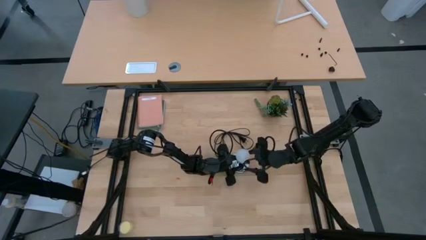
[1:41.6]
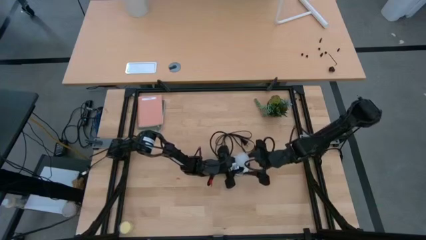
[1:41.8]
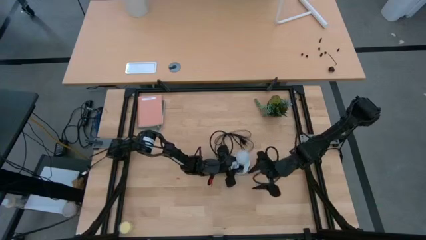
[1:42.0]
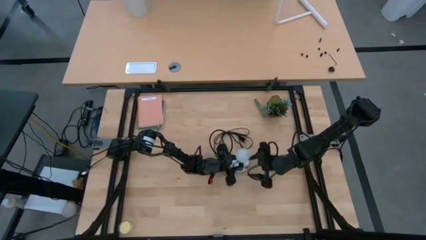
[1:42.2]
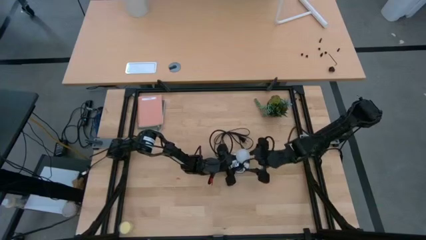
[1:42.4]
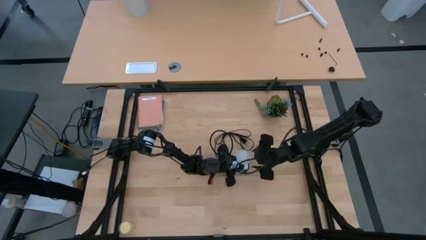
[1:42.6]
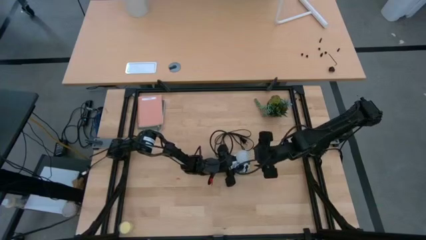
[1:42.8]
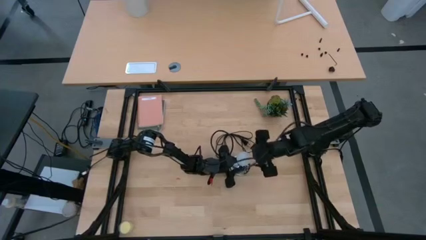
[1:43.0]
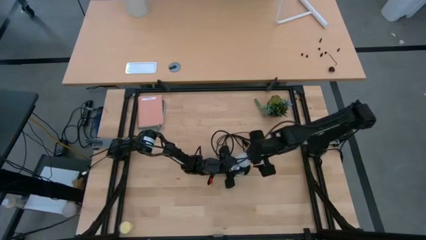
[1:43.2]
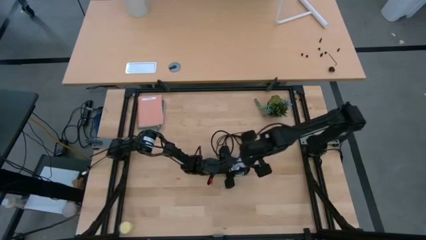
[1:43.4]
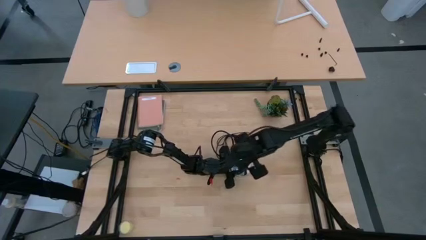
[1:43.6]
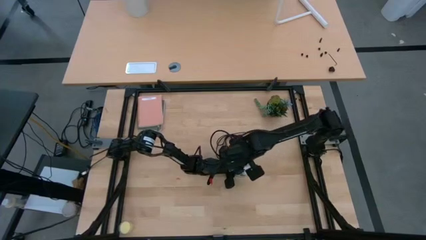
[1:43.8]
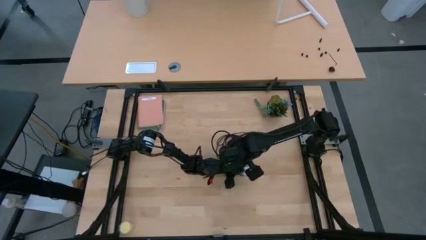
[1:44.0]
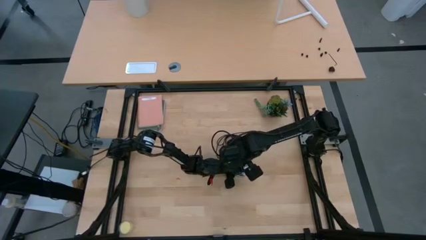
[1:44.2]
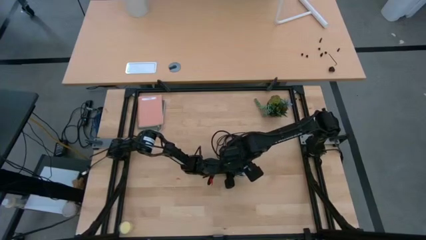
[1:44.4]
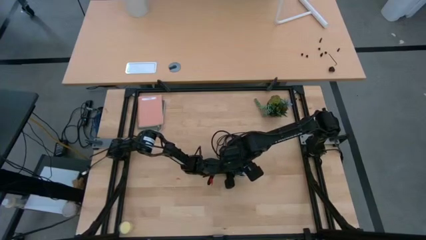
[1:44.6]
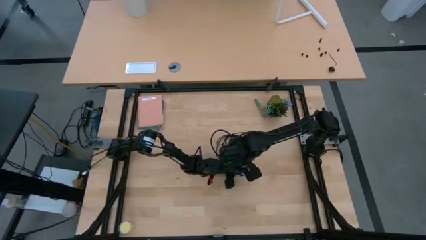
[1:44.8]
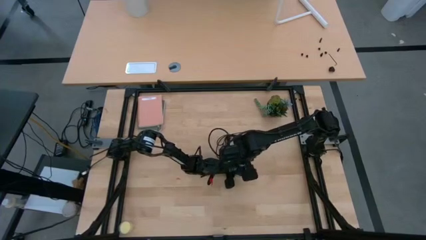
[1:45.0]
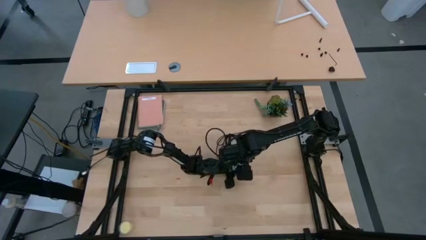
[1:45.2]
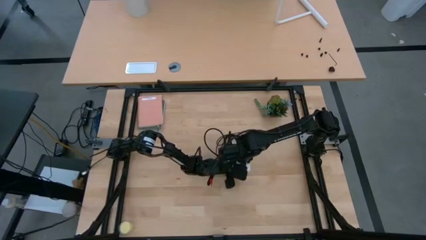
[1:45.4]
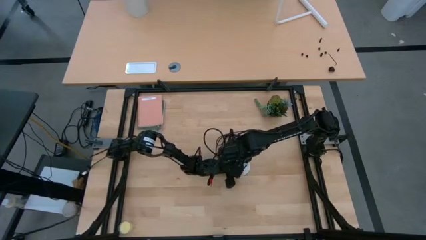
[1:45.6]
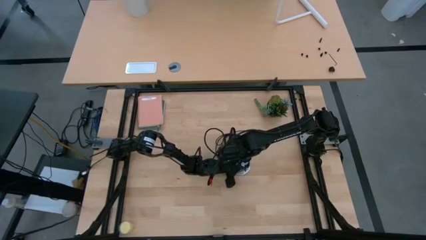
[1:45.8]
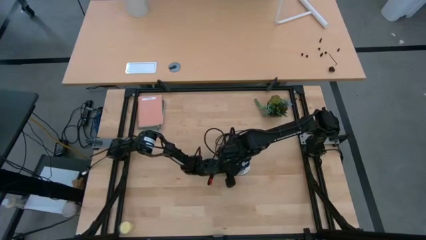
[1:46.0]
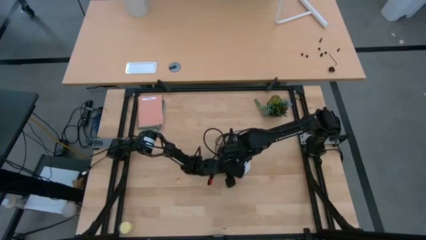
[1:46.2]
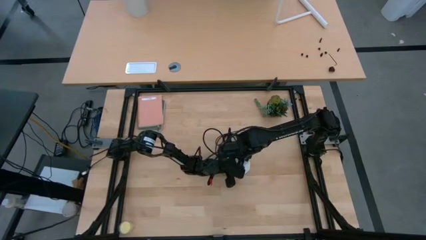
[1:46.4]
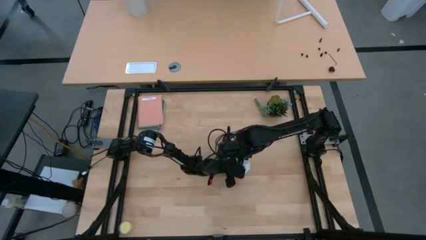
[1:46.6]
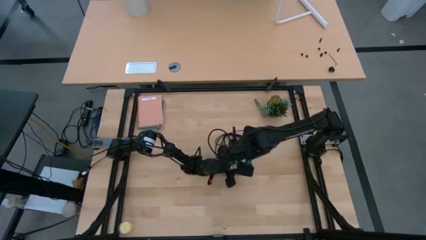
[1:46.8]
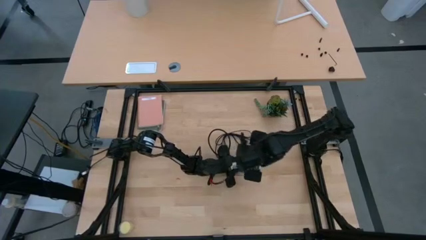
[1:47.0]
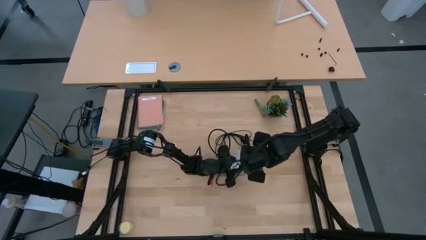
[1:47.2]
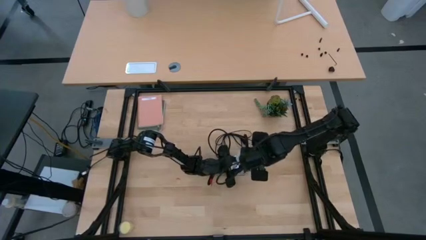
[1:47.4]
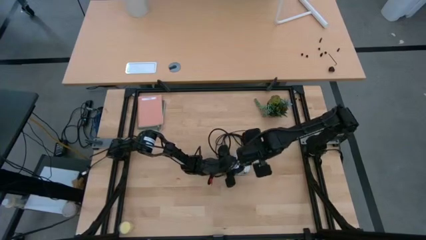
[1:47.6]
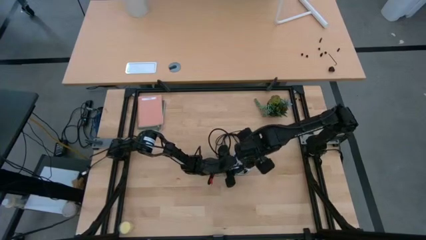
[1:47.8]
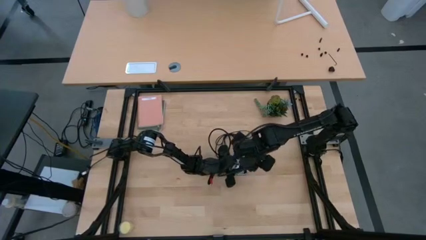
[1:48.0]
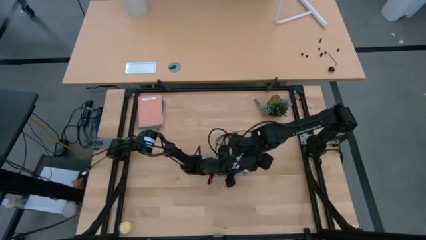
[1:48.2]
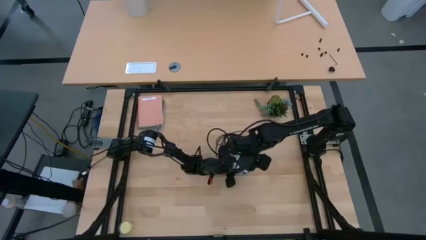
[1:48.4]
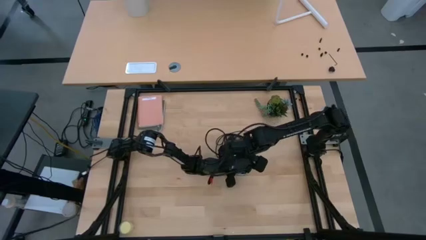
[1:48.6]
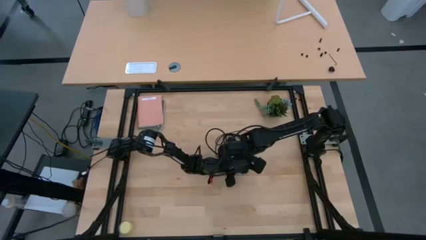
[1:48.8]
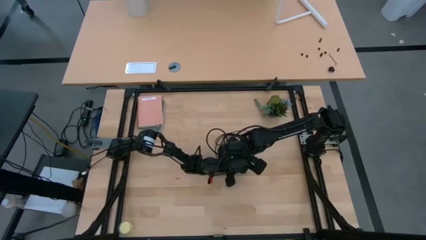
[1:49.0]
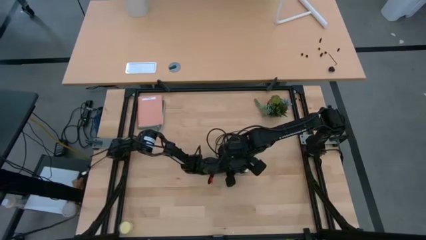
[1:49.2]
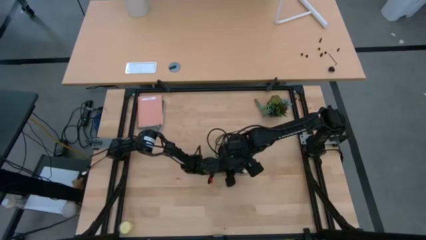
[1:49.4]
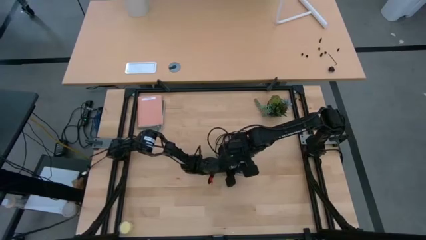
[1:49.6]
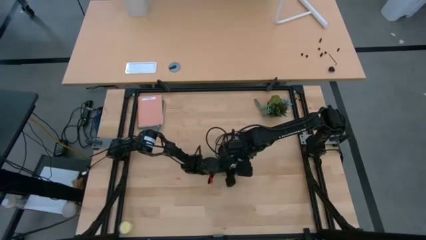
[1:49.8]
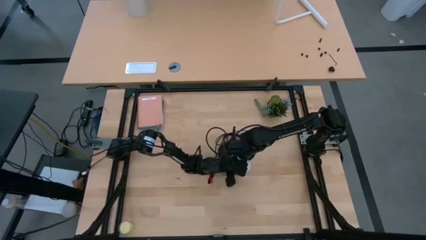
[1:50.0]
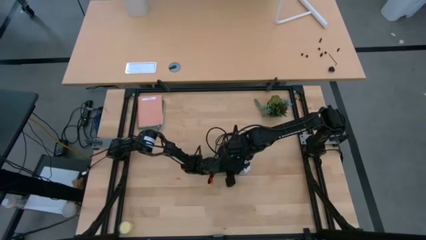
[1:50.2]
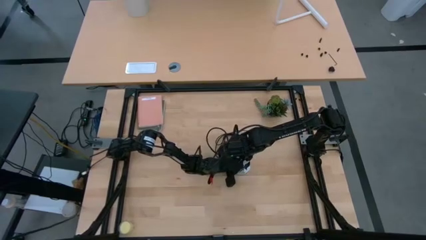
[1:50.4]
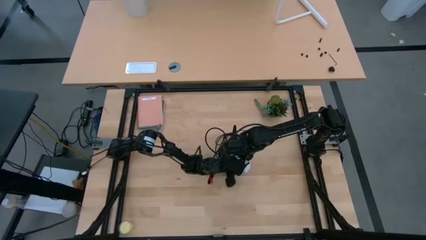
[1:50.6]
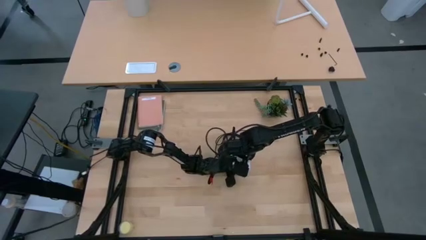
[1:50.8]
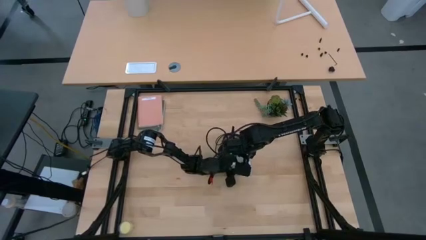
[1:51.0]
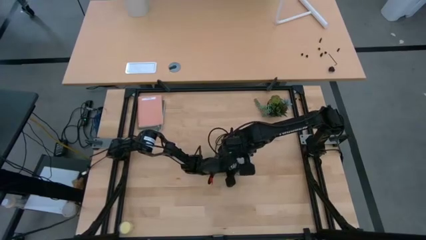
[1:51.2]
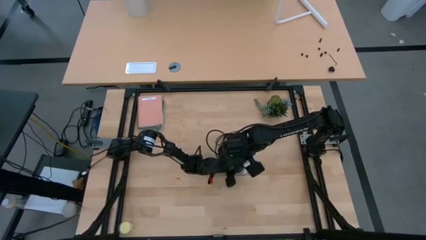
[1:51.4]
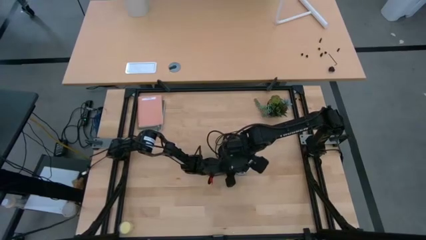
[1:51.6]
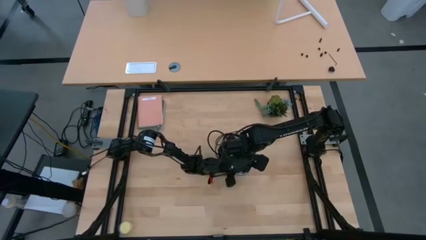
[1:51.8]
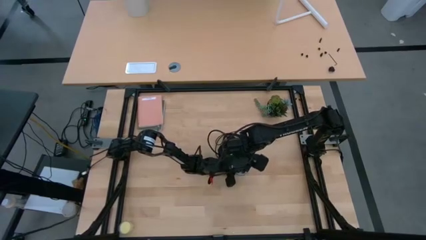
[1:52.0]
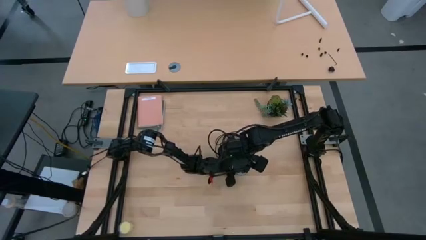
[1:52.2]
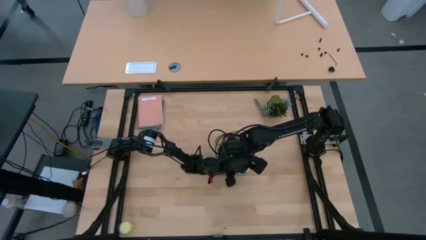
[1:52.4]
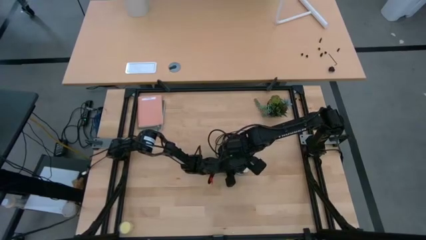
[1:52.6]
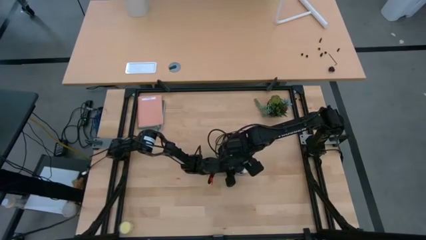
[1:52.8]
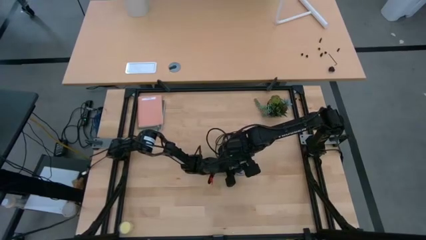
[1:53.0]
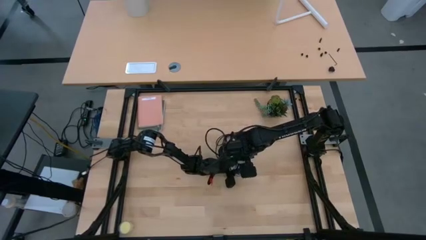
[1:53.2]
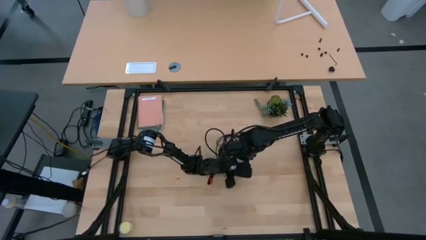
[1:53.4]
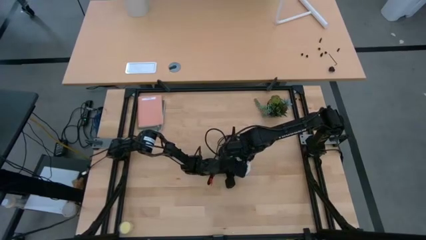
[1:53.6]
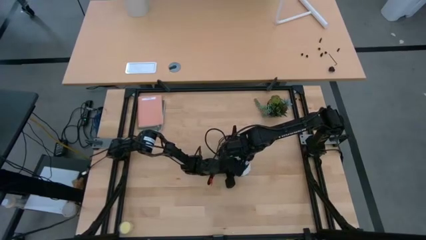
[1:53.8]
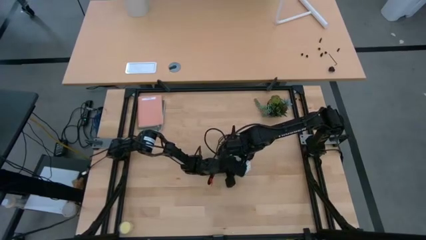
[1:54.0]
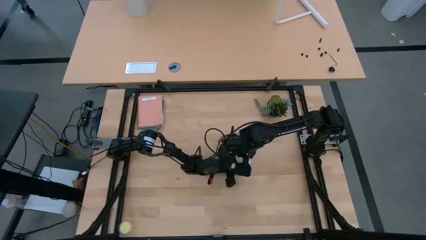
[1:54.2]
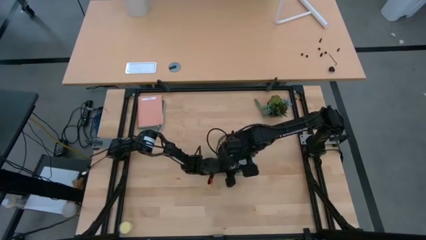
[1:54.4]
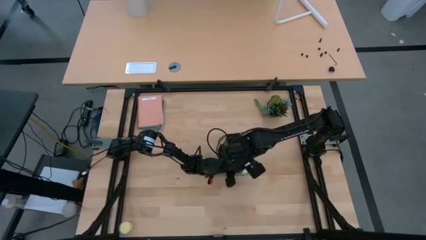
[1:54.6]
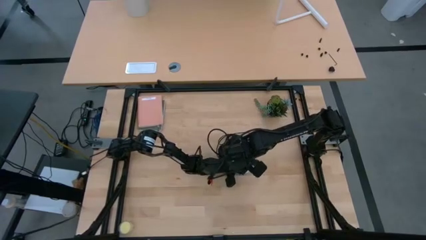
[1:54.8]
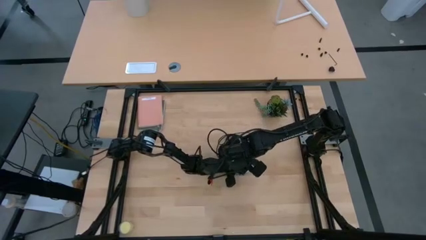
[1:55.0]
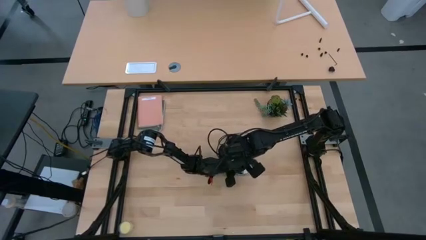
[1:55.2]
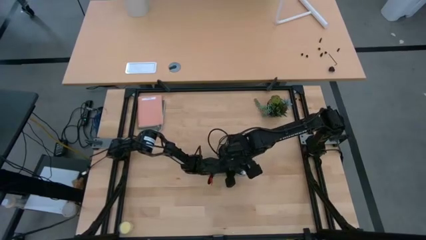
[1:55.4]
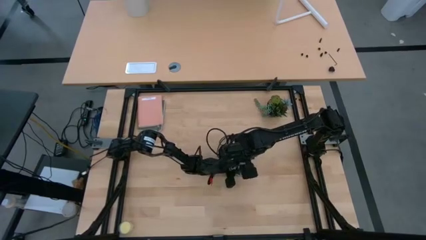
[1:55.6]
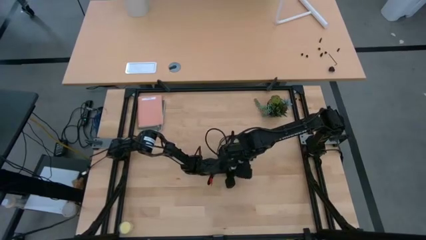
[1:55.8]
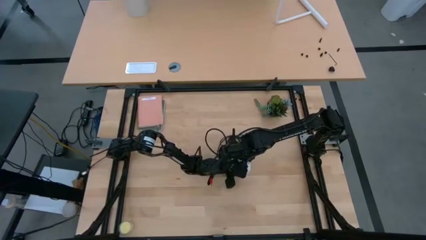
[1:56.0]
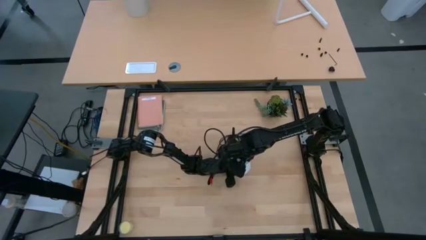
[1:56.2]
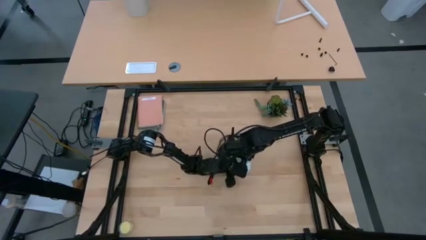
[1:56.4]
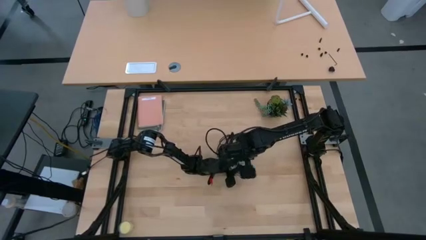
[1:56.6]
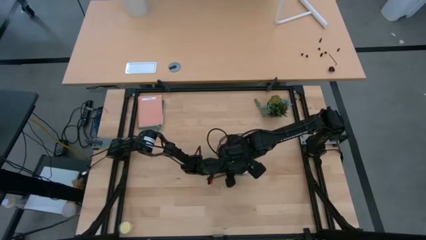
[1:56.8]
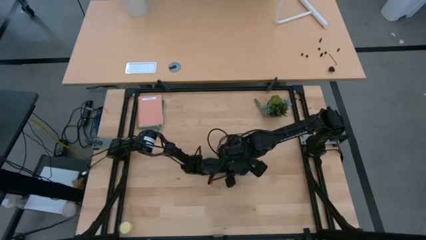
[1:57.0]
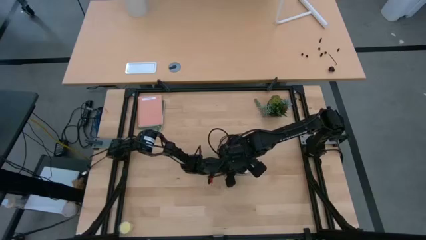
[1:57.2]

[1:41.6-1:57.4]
Task: Screw lightbulb
Insert the white lightbulb into the silver lamp
